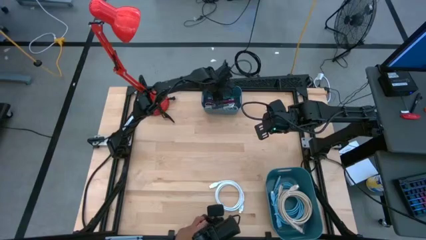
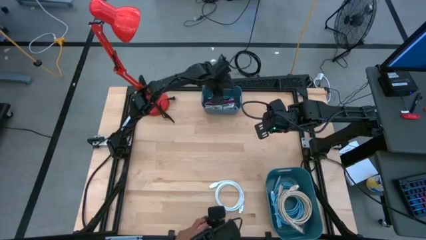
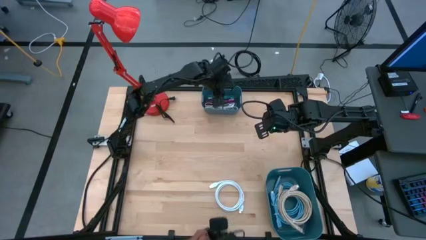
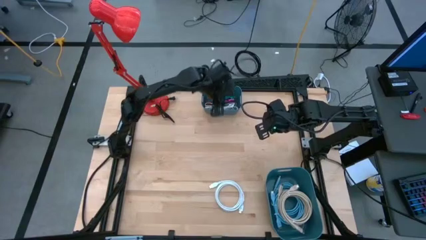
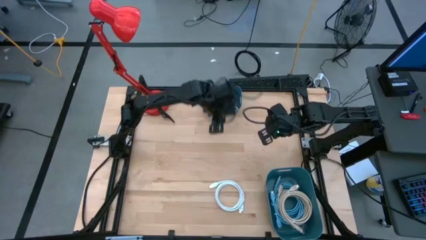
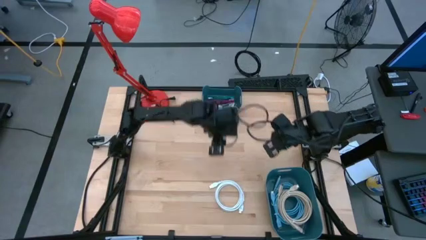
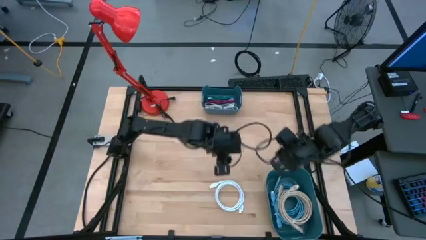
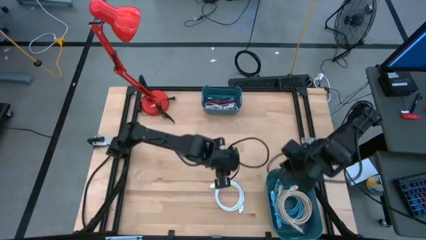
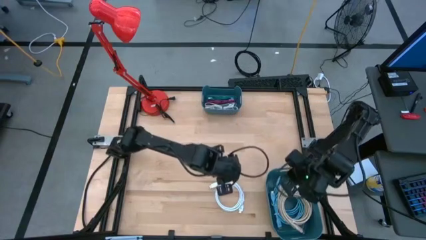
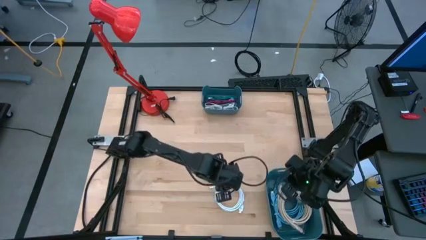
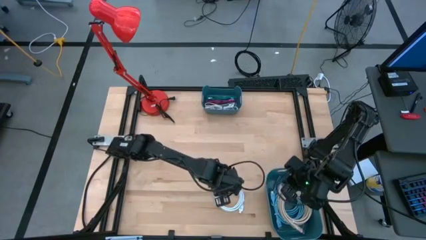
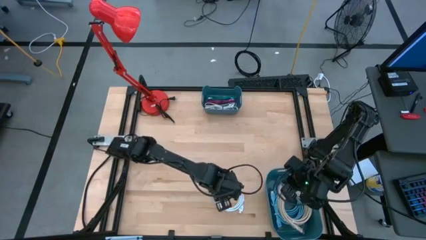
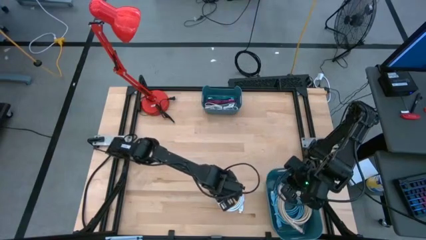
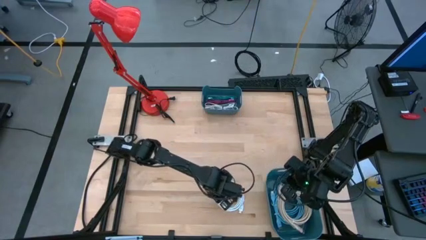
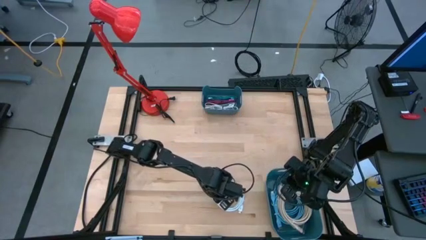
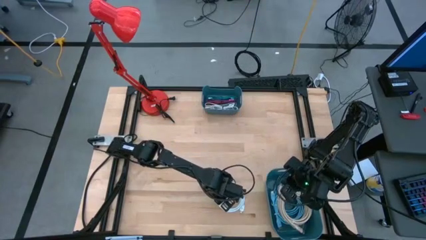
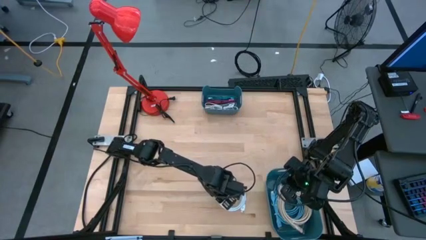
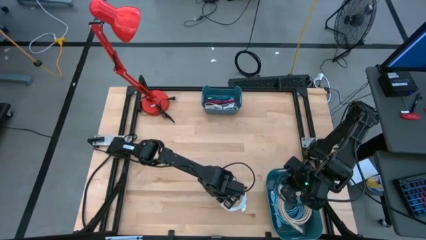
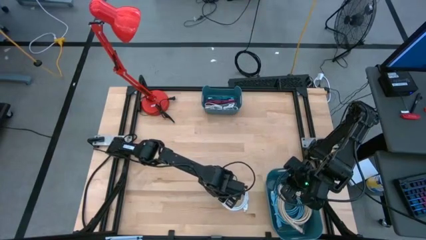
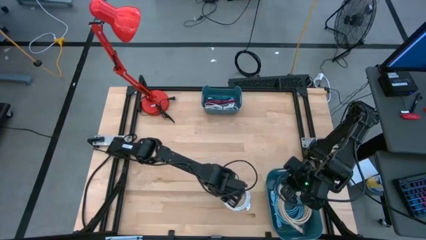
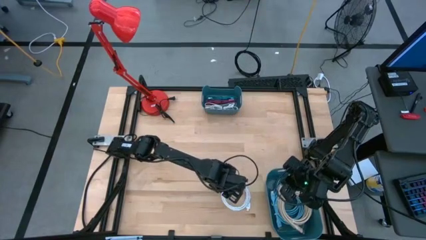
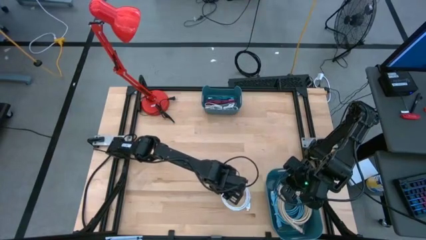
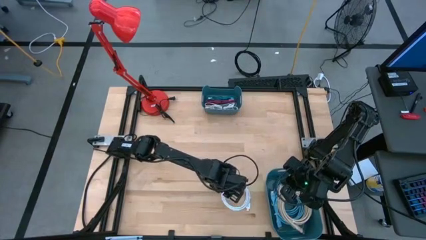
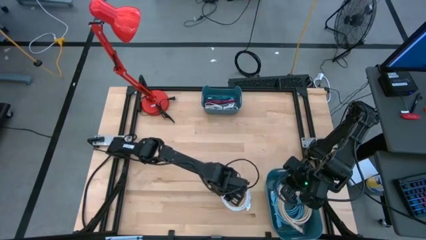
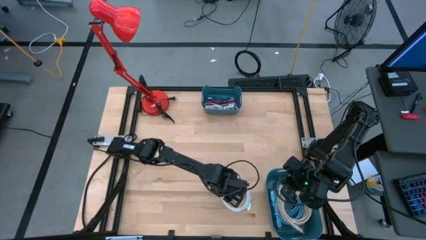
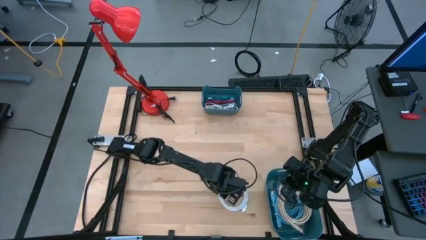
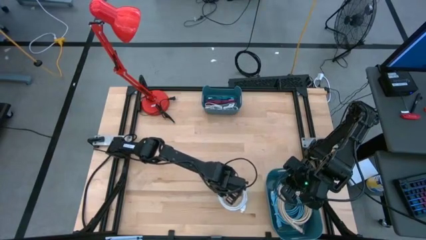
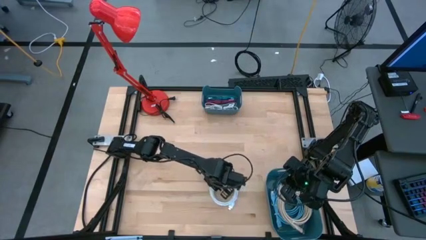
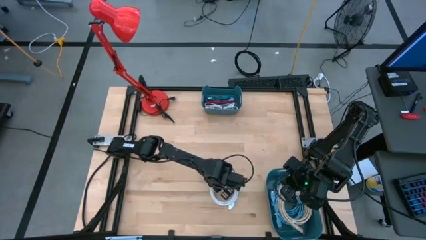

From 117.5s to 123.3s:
Task: Pick & Place USB Port
Put the white HDMI cable into the bottom blue bin

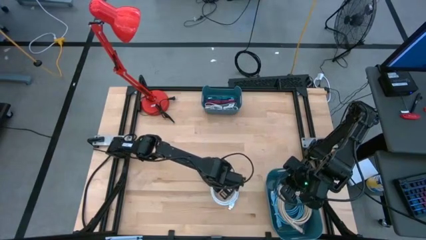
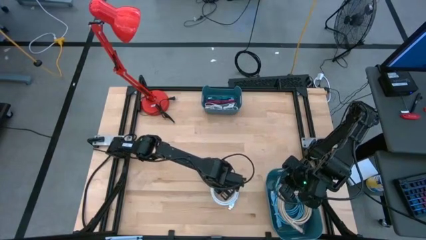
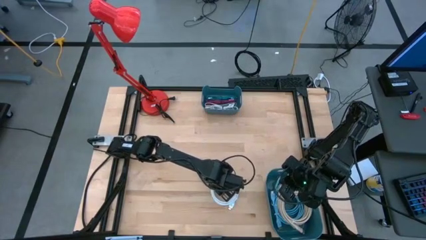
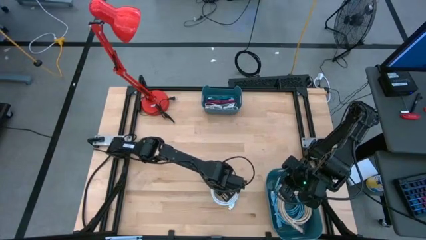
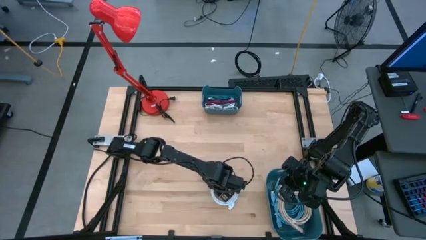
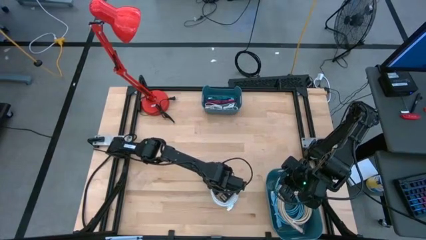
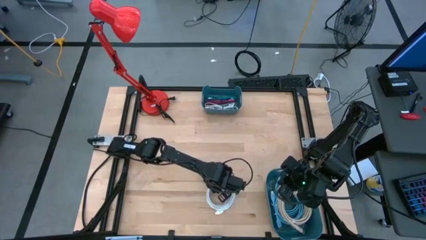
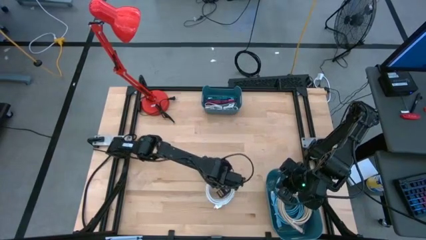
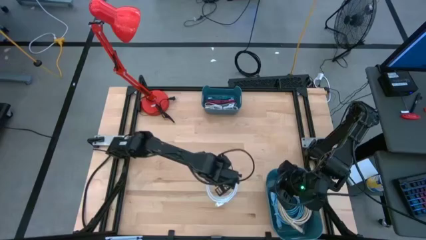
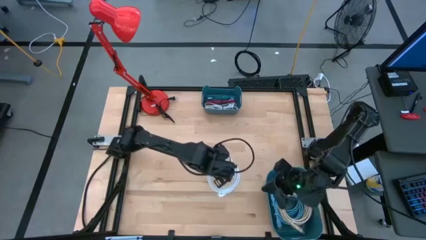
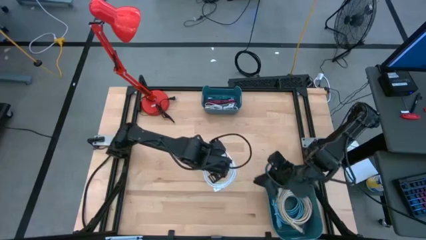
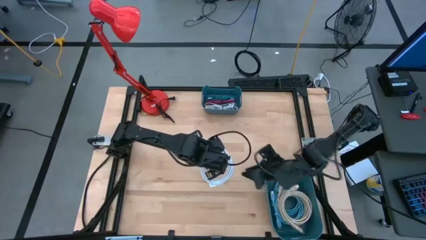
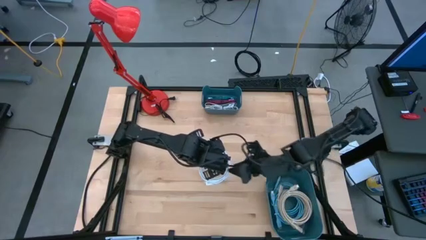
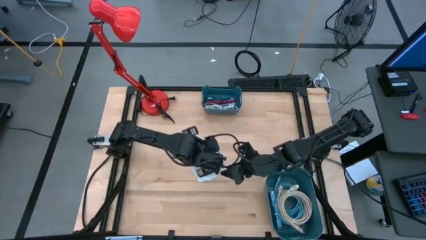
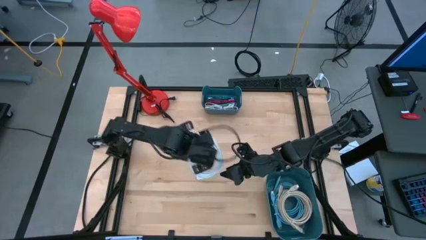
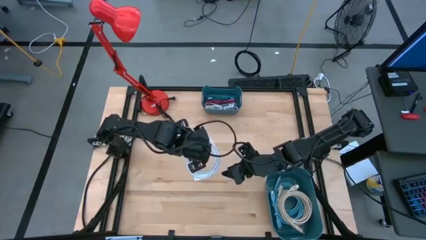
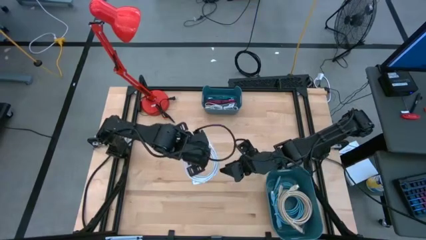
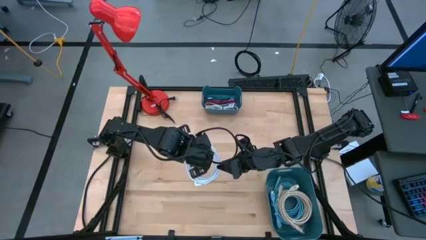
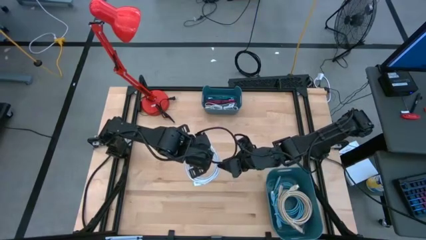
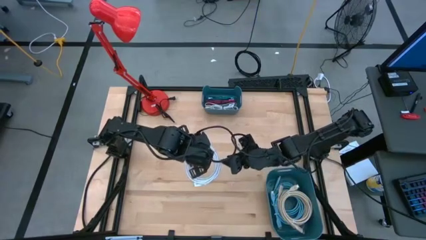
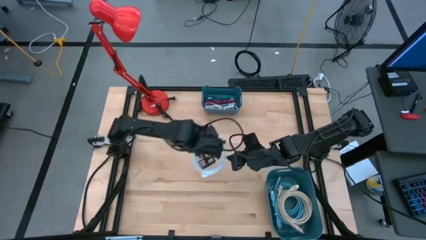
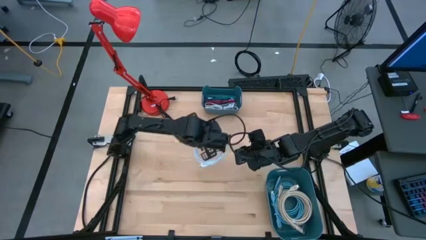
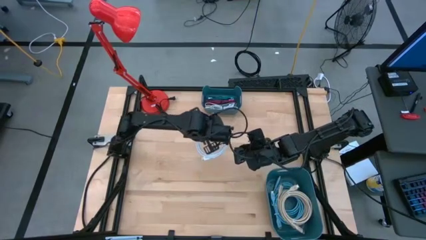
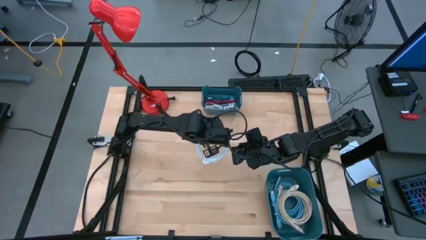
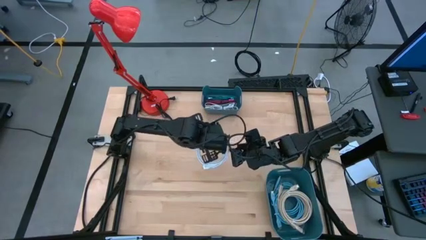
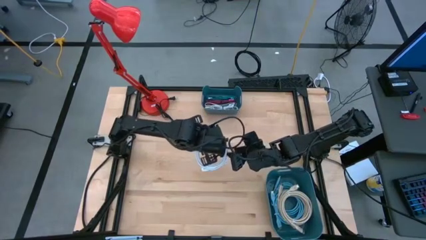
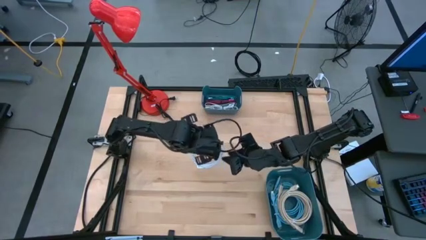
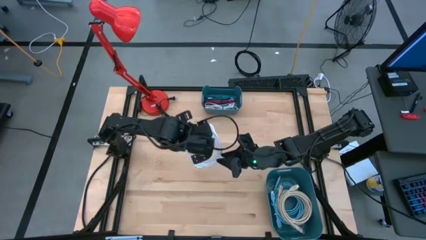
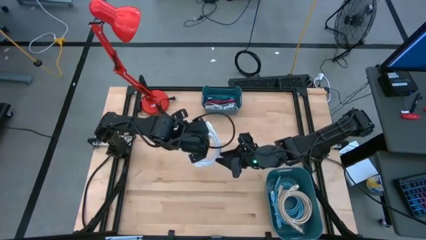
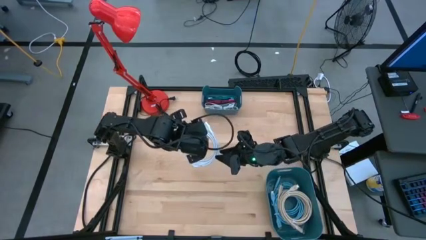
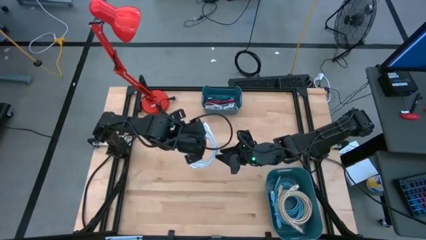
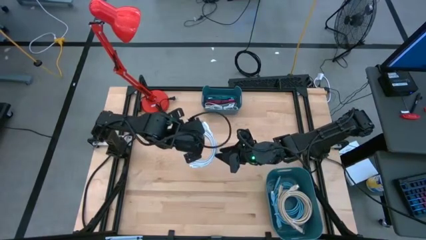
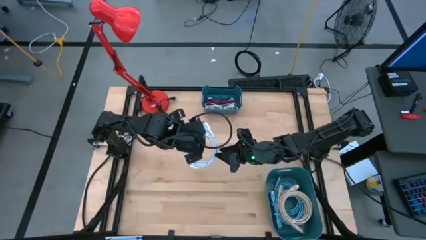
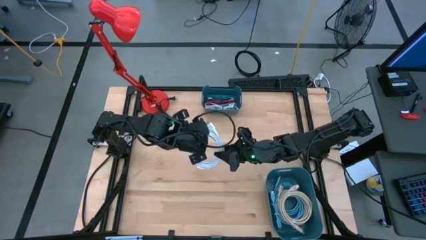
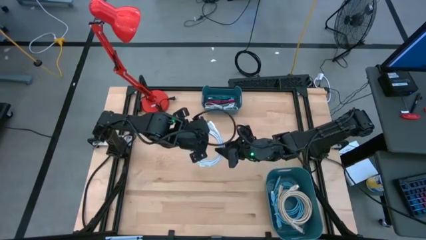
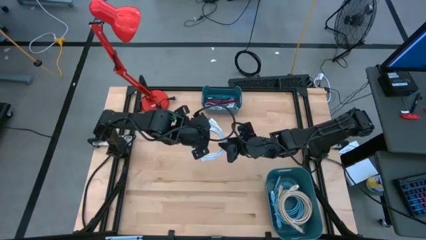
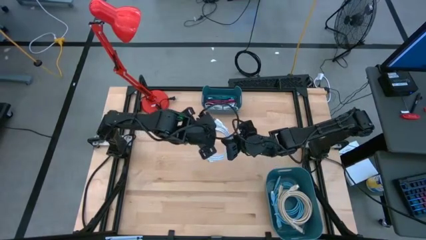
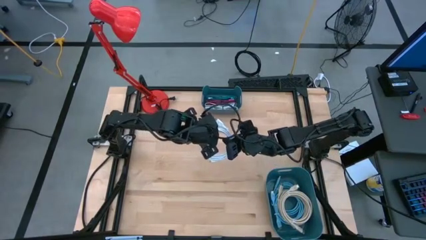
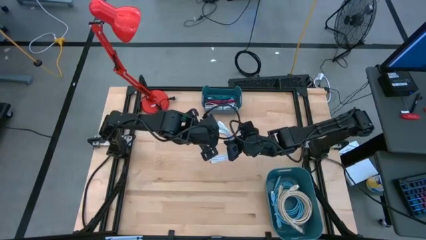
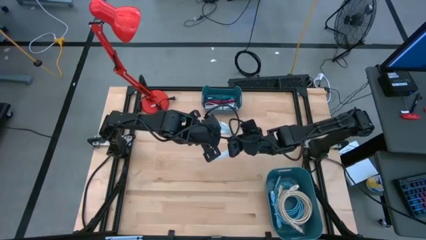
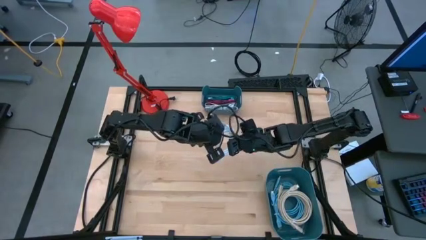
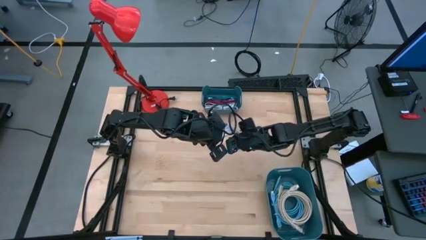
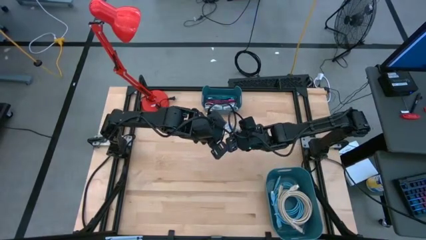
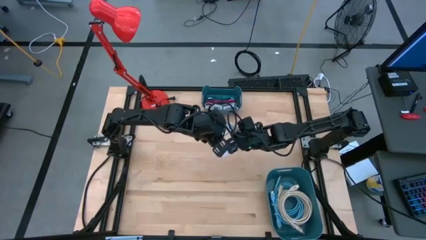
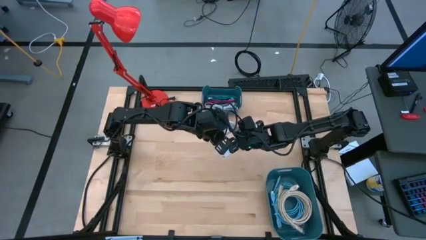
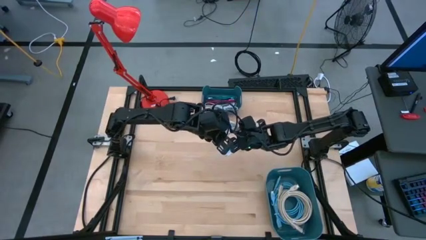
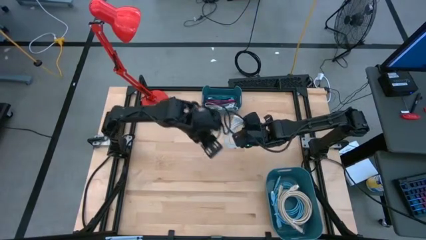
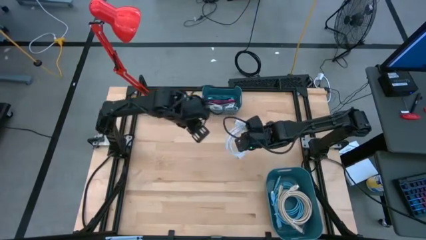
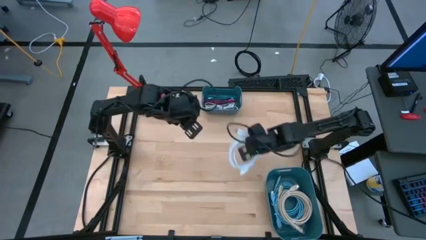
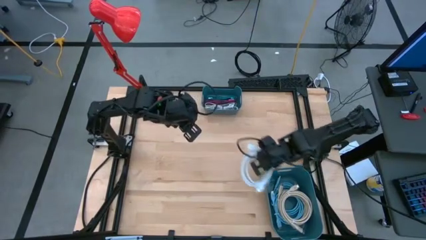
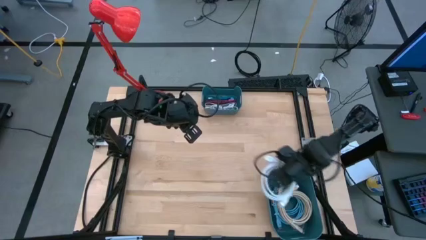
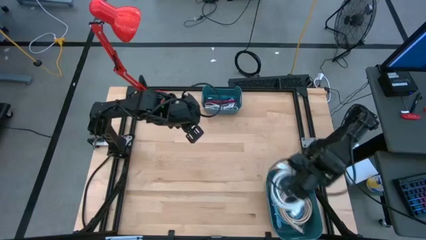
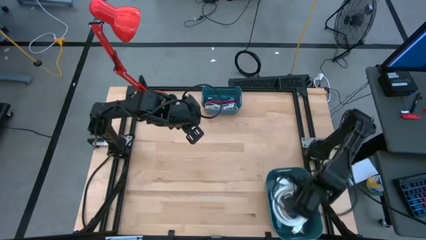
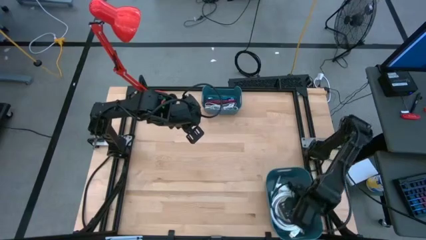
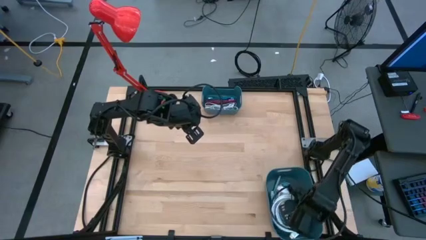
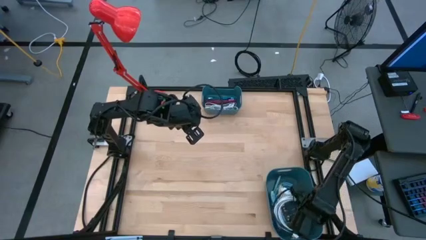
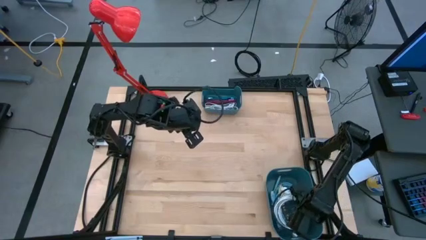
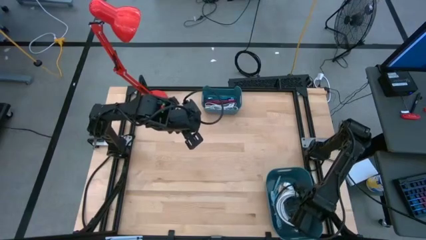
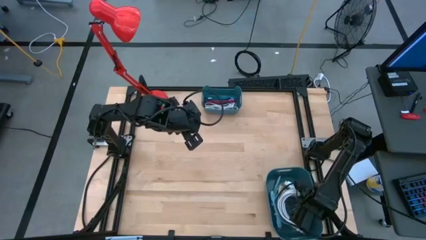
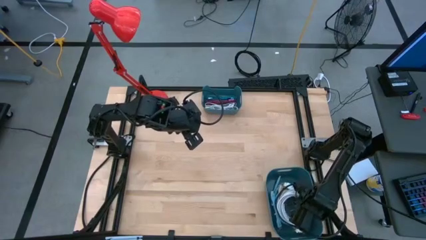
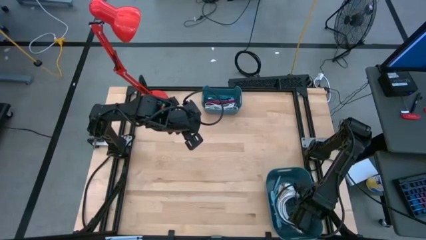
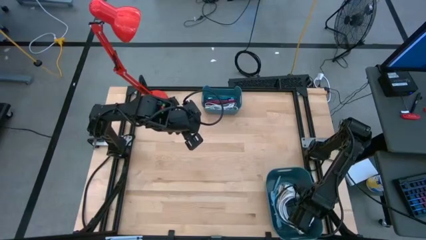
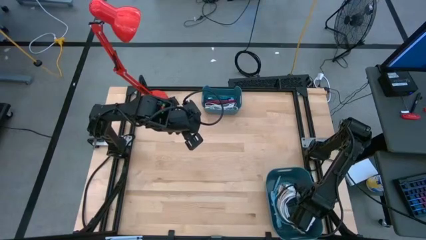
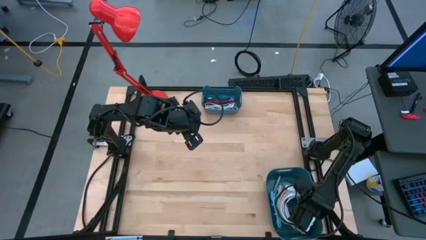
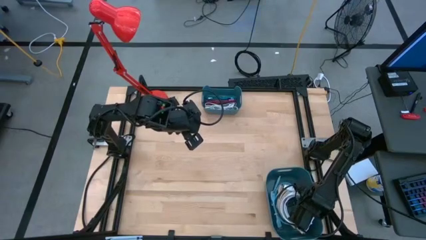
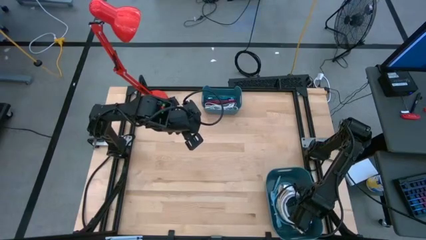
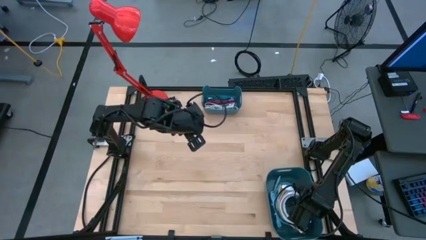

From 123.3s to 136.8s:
Put the white HDMI cable into the bottom blue bin
